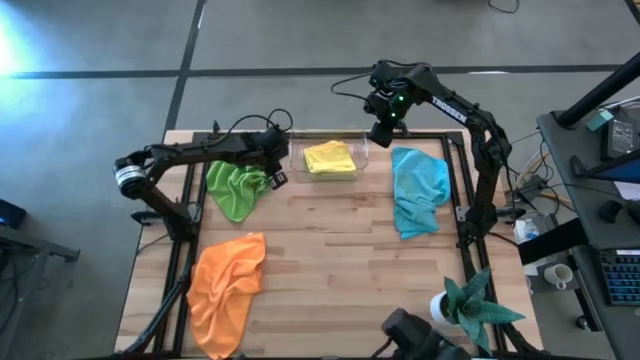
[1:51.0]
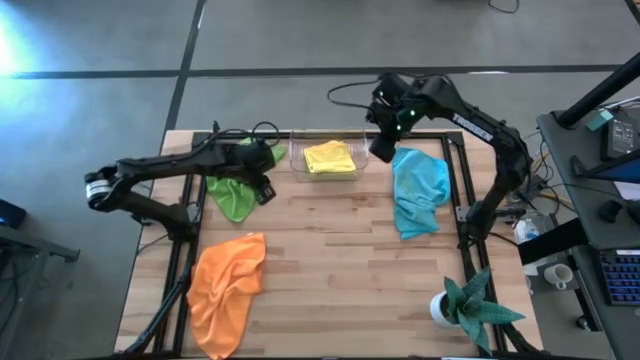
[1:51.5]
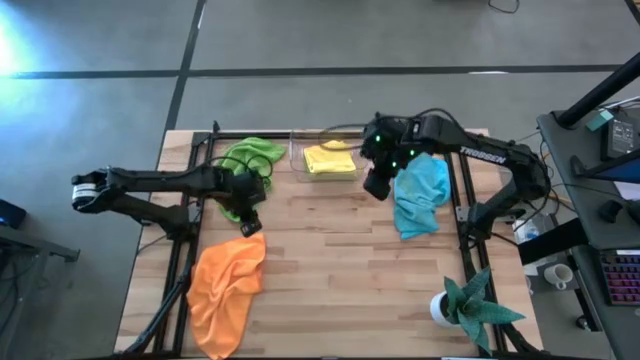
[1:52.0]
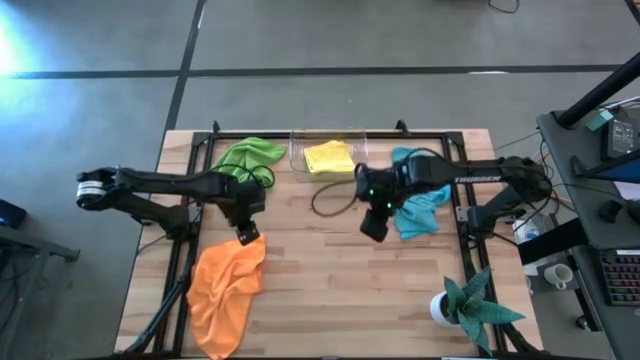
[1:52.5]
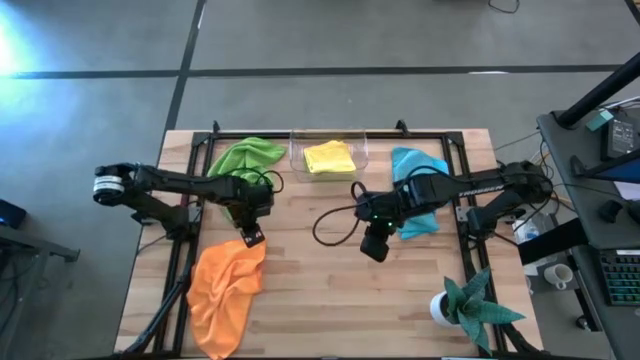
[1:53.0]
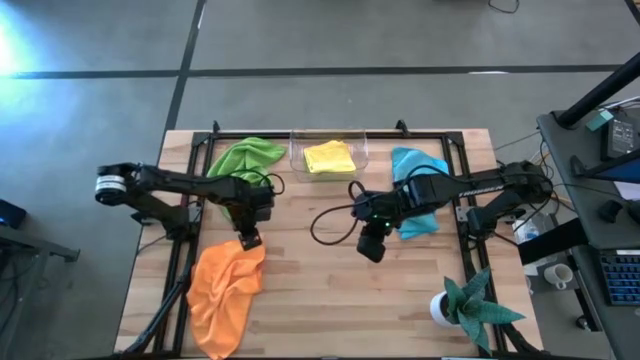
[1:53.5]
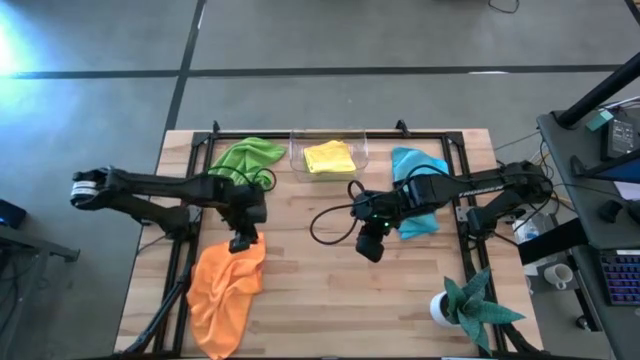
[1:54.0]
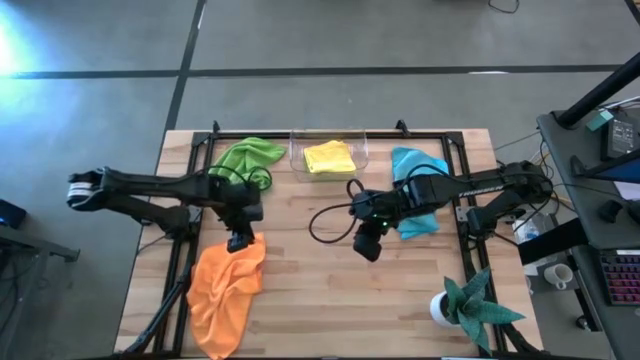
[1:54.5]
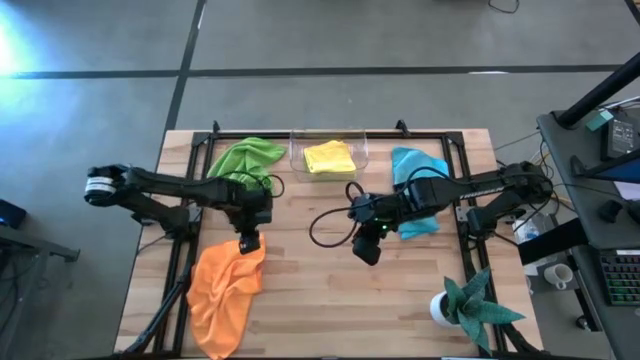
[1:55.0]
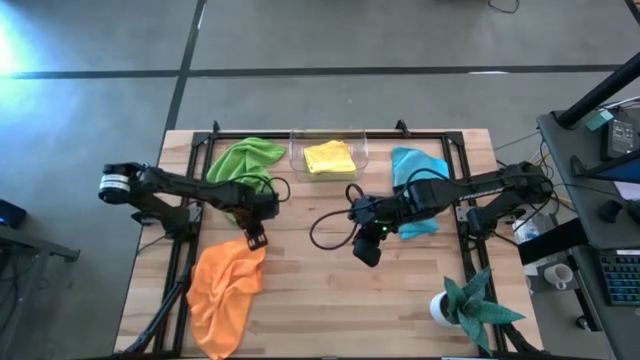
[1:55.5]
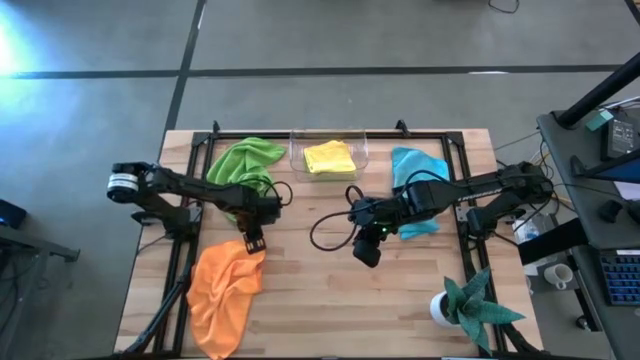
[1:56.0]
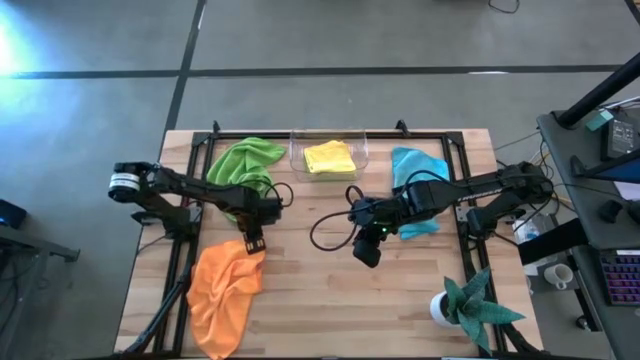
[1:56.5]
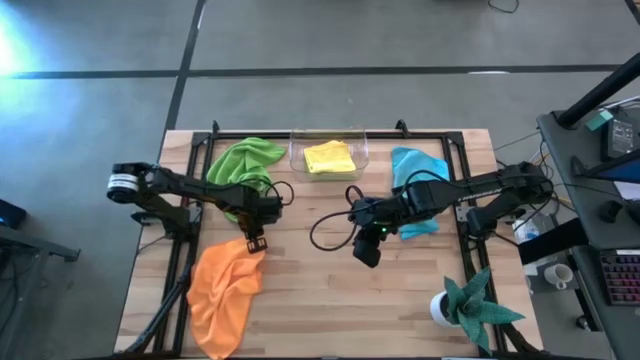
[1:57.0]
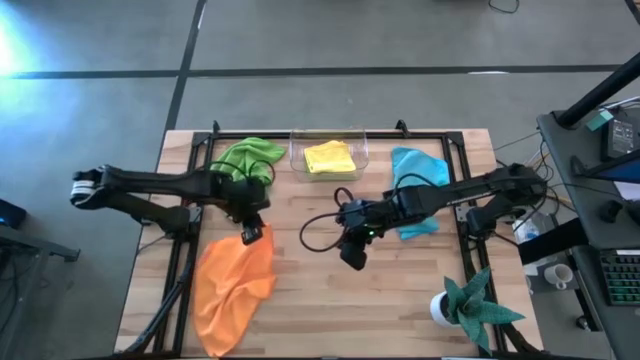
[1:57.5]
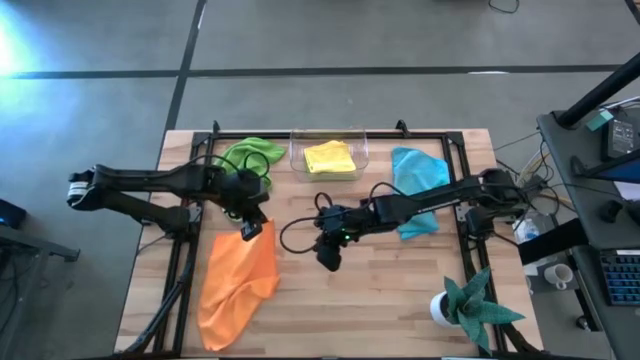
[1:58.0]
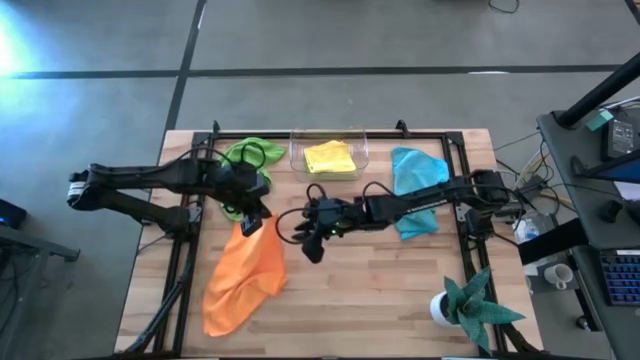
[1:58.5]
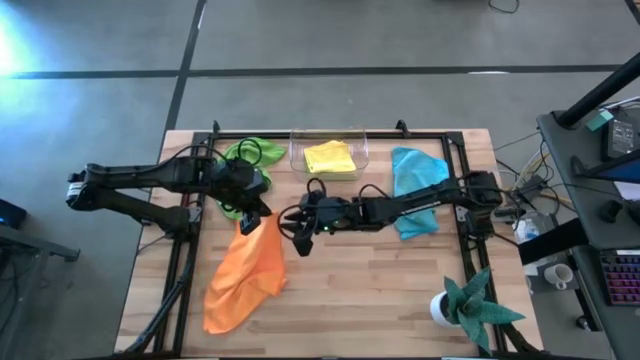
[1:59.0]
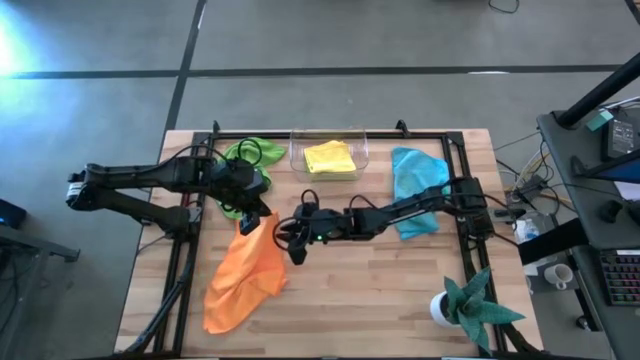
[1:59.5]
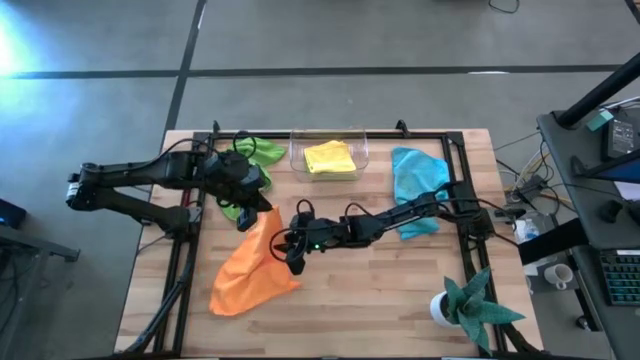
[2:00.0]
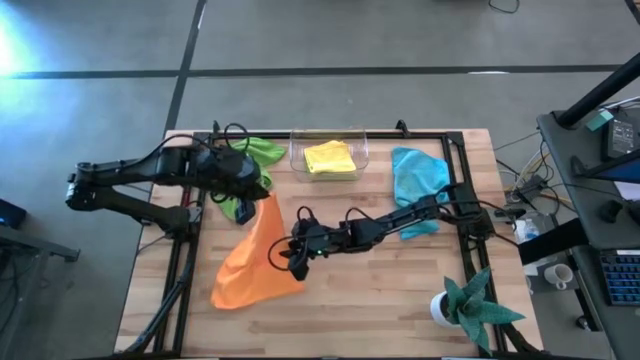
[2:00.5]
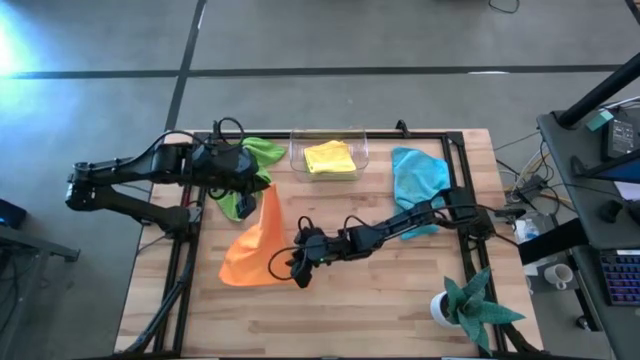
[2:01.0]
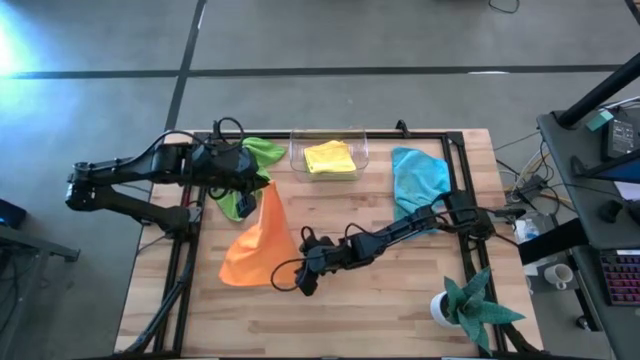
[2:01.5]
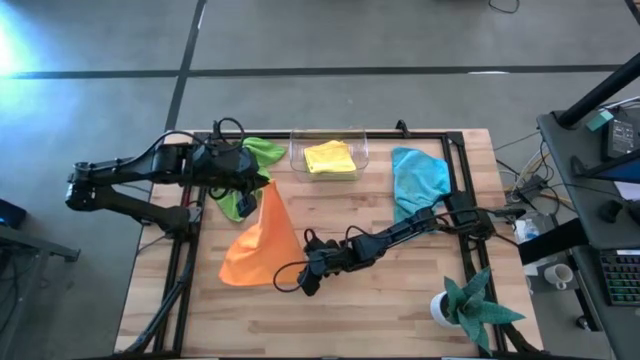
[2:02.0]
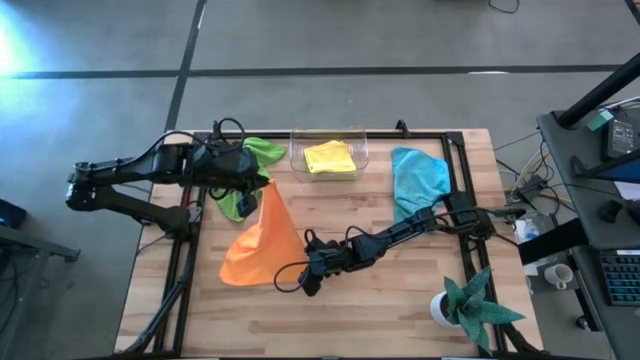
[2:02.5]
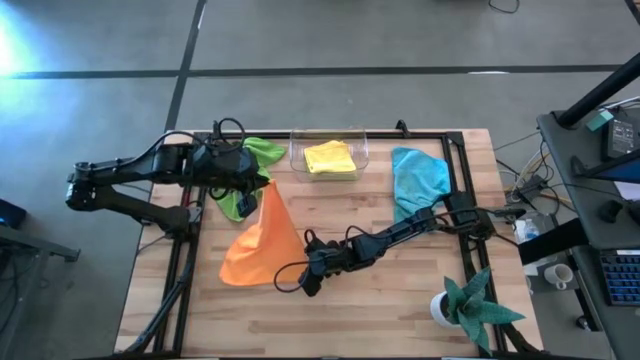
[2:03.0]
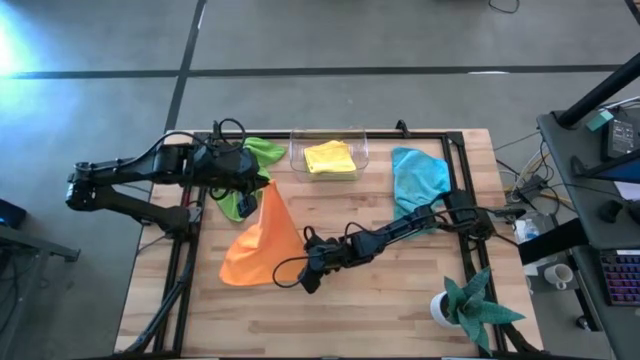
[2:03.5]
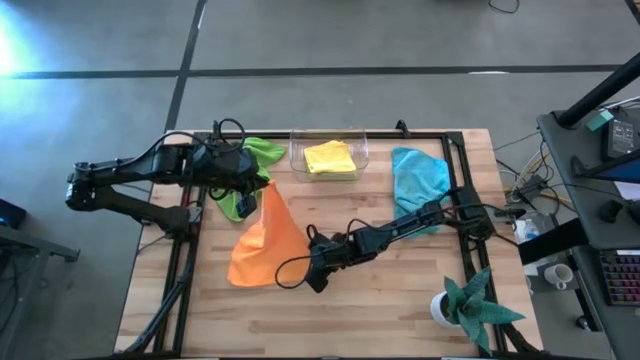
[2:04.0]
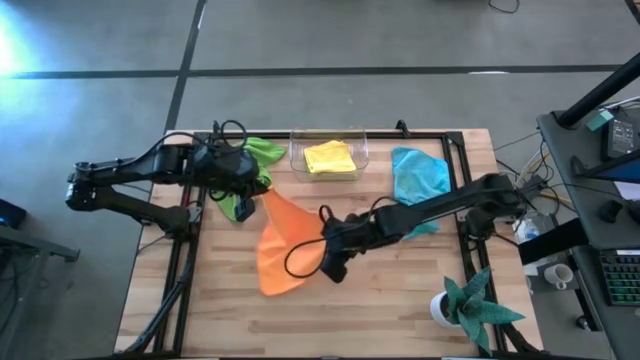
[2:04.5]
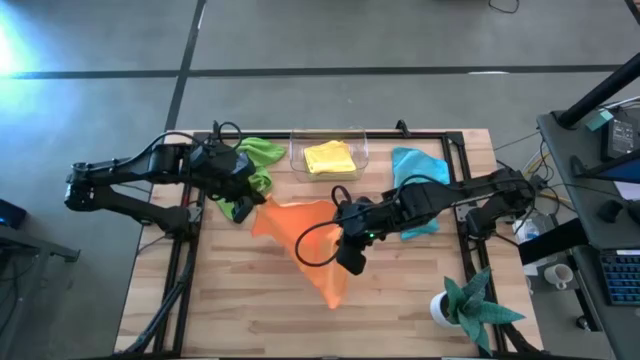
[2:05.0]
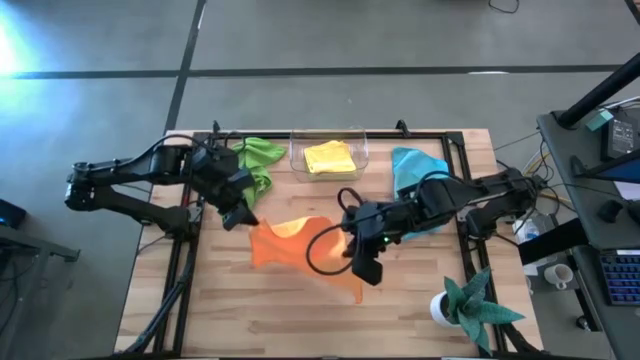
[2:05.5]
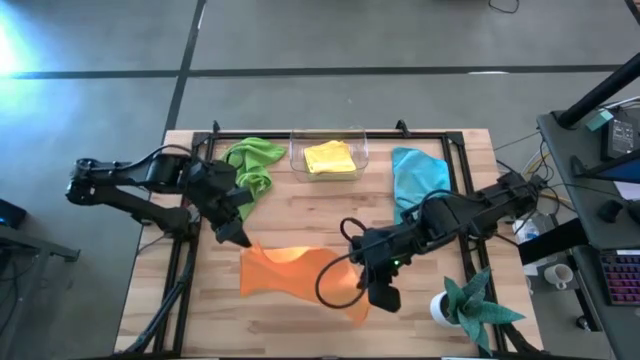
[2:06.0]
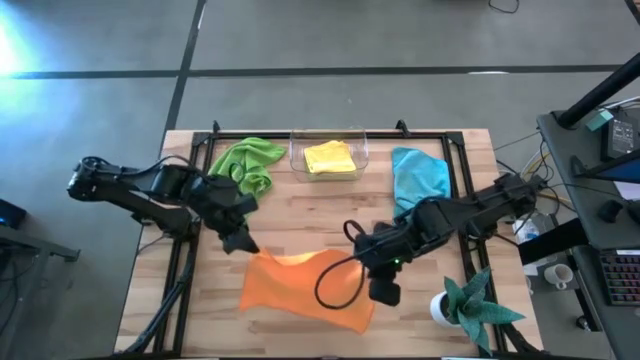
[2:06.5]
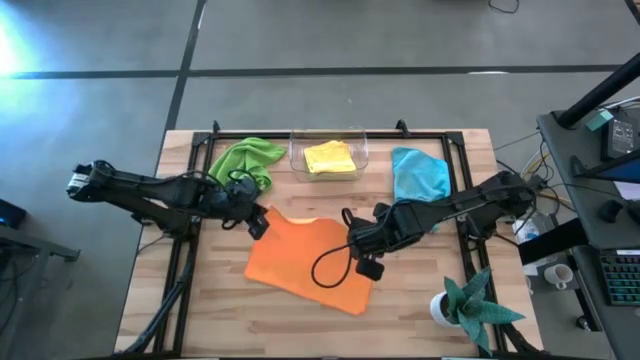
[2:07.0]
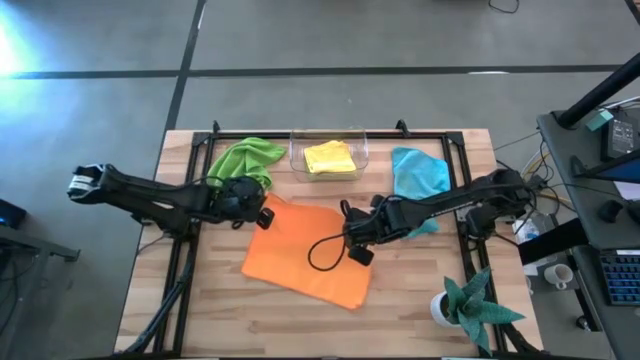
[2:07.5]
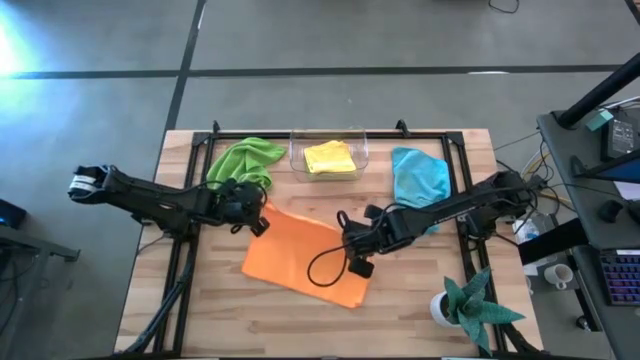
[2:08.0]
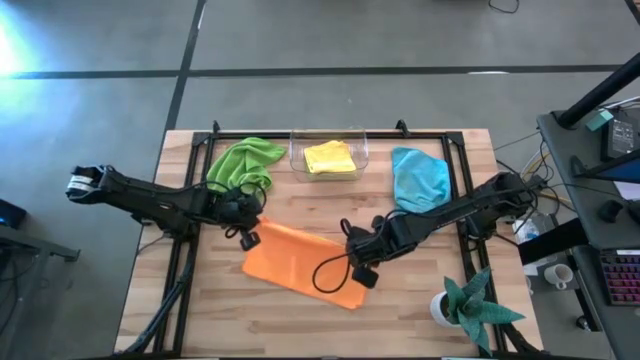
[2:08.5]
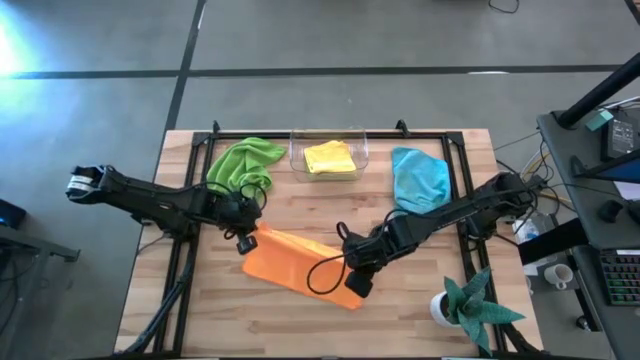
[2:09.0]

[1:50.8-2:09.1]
Task: Fold microfiber towels
Fold the orange microfiber towel into the transparent bin

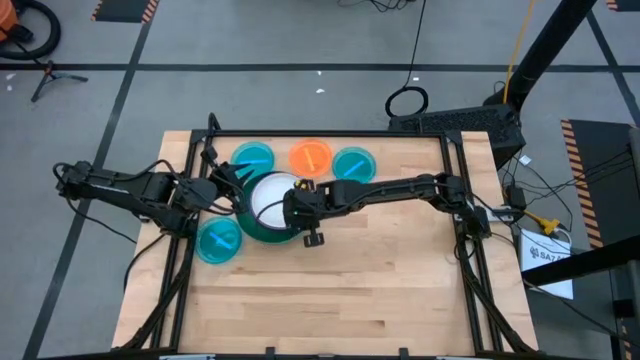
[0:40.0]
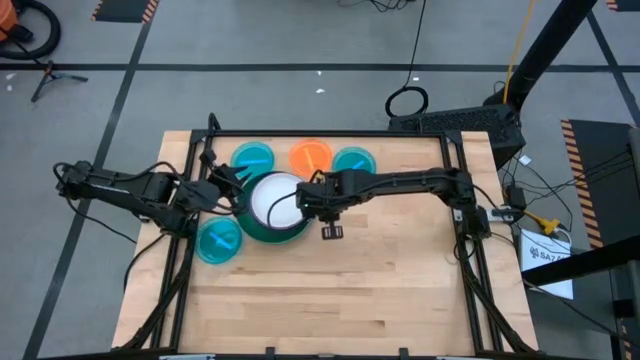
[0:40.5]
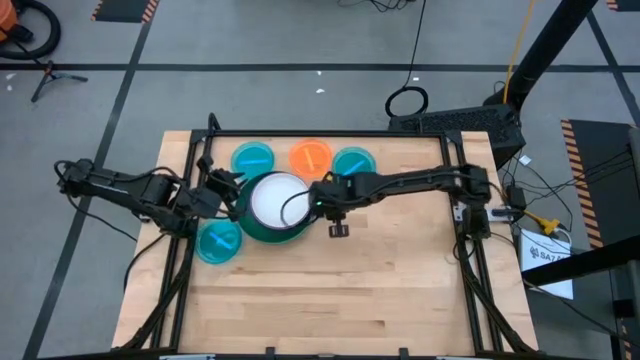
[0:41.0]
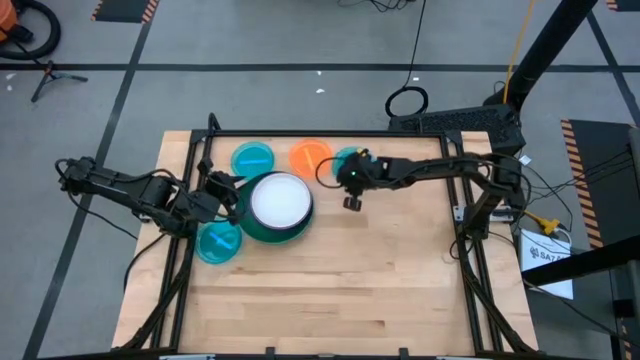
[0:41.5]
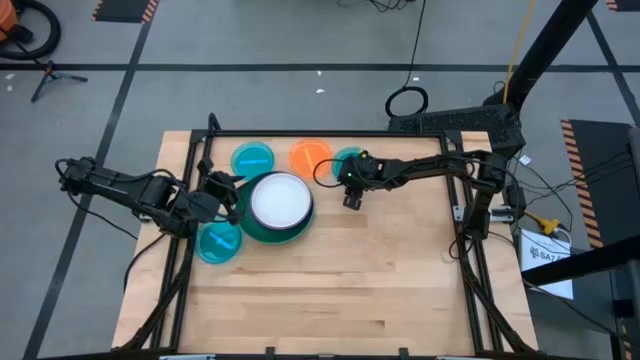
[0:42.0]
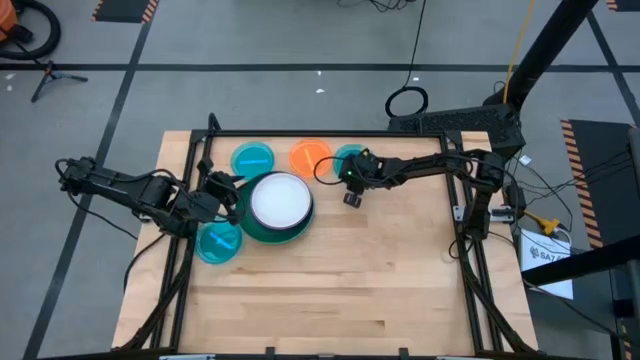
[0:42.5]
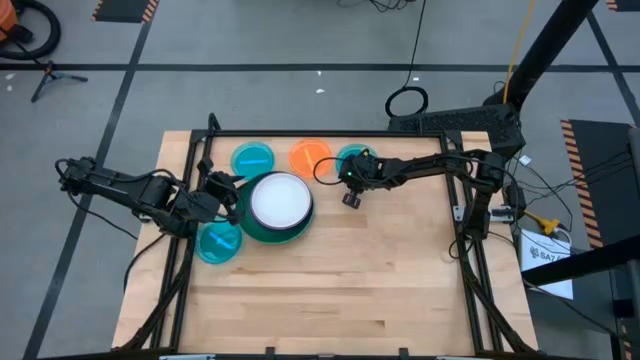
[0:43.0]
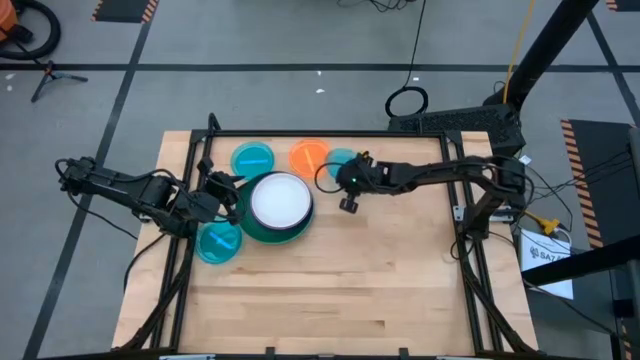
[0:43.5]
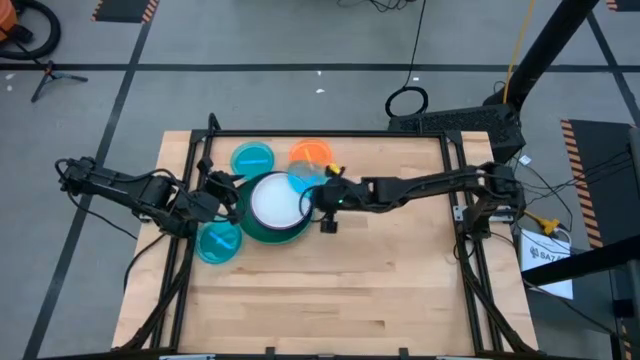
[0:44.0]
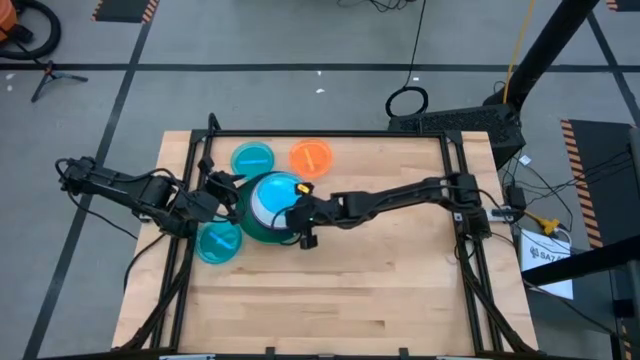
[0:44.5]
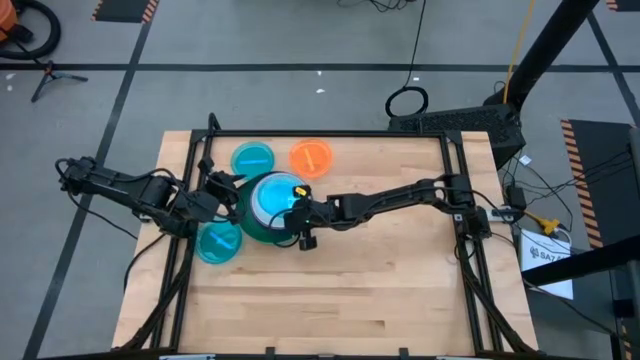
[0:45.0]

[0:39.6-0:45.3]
Task: Stack plastic plates
Stack the top right blue plate on top of the white plate
